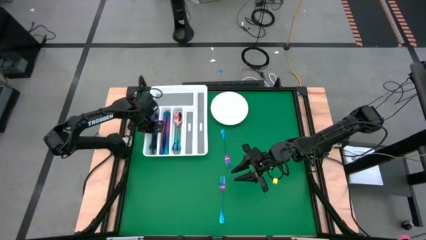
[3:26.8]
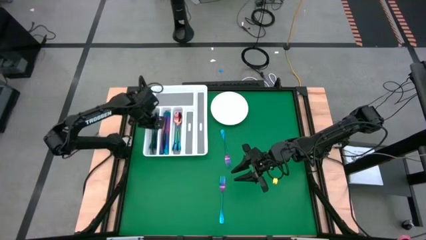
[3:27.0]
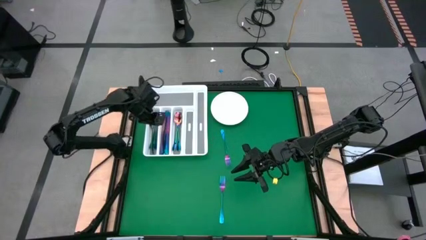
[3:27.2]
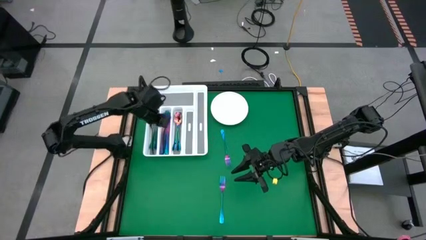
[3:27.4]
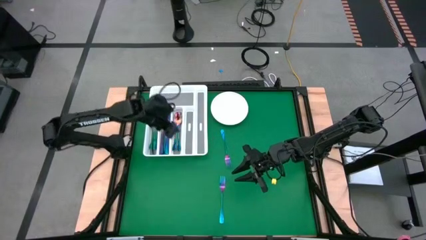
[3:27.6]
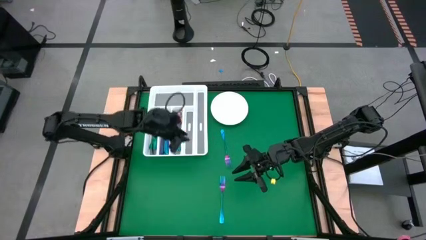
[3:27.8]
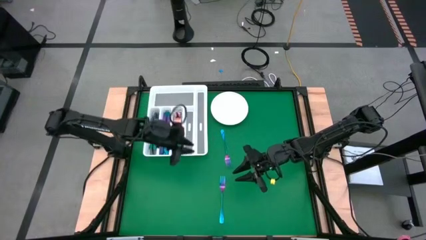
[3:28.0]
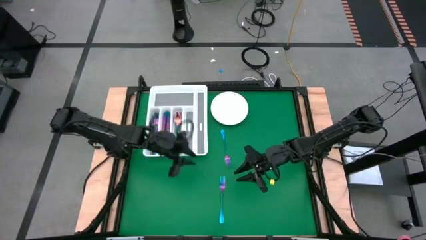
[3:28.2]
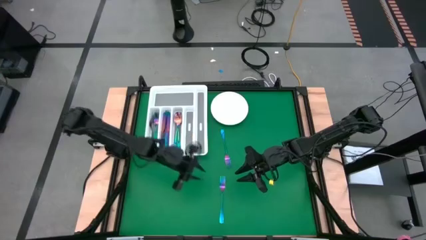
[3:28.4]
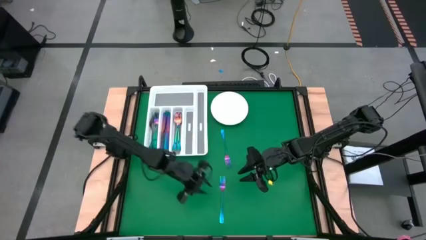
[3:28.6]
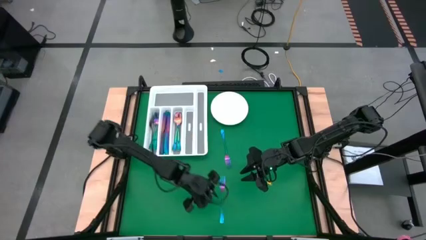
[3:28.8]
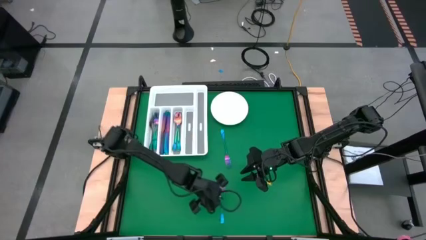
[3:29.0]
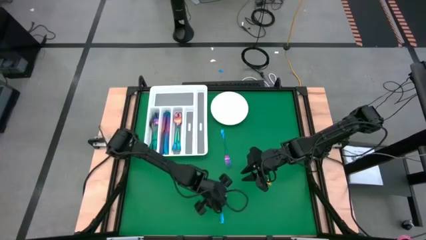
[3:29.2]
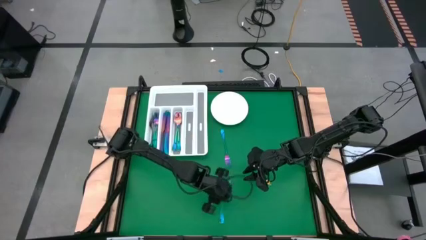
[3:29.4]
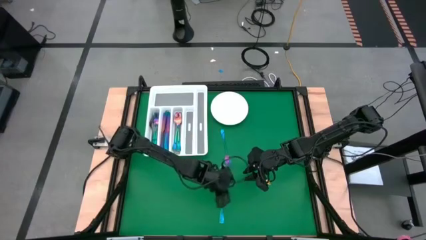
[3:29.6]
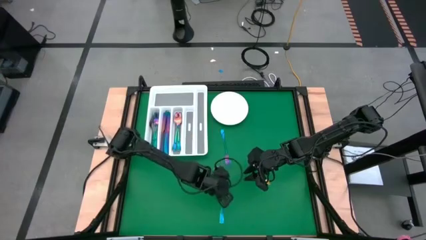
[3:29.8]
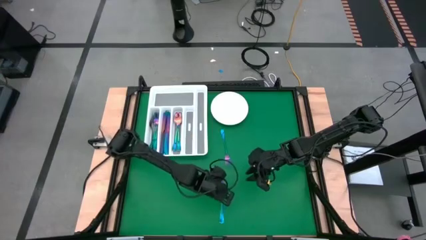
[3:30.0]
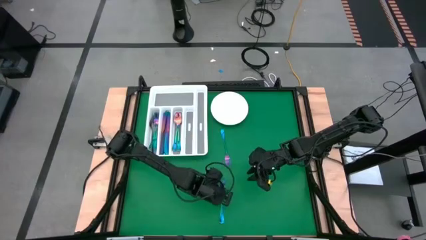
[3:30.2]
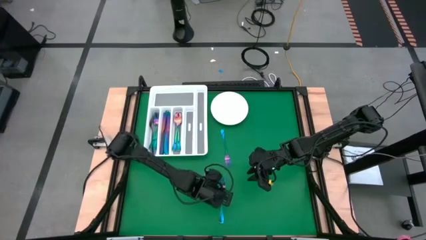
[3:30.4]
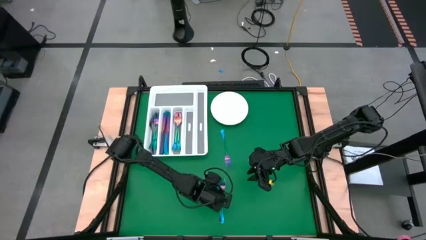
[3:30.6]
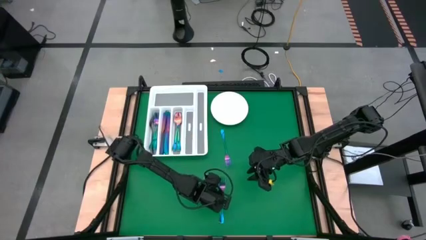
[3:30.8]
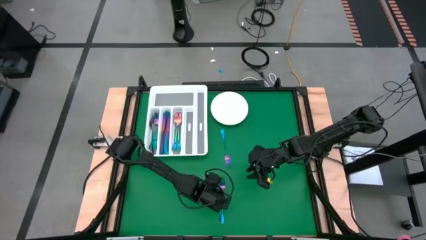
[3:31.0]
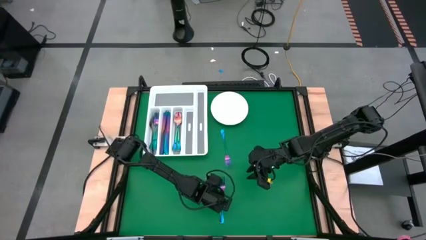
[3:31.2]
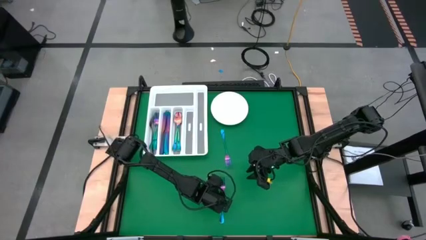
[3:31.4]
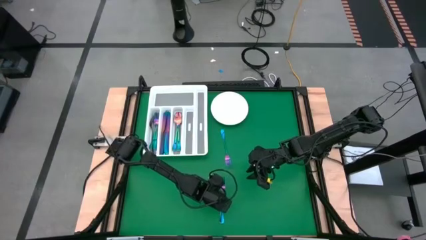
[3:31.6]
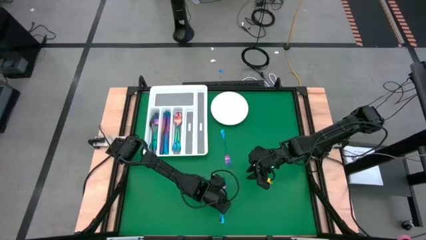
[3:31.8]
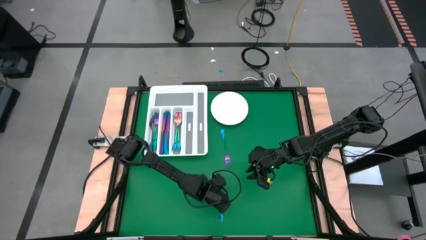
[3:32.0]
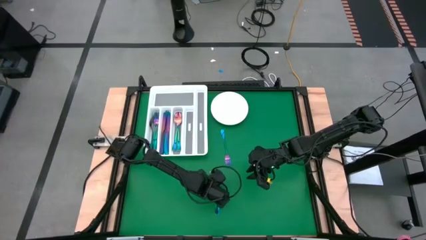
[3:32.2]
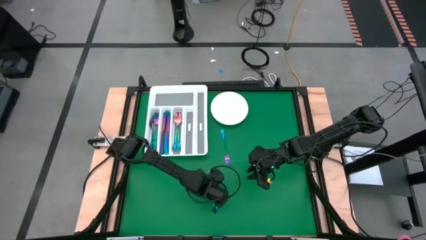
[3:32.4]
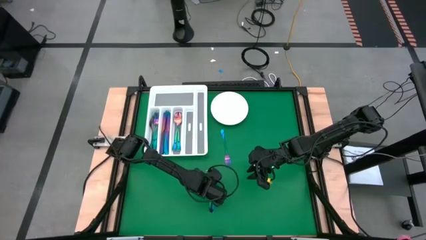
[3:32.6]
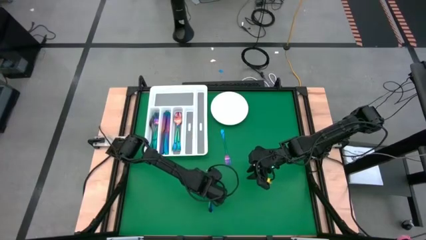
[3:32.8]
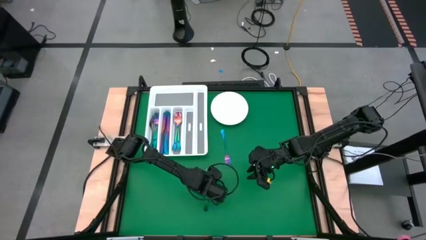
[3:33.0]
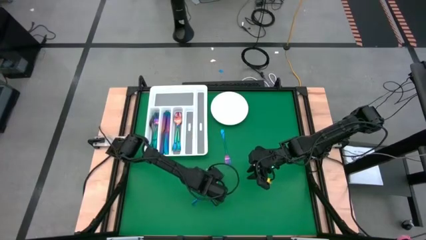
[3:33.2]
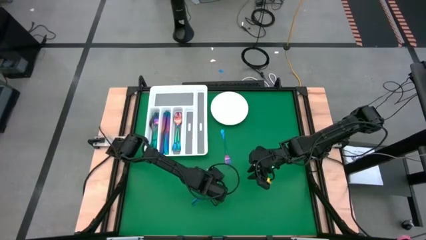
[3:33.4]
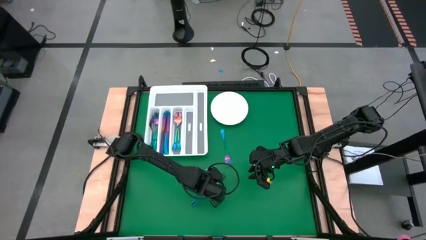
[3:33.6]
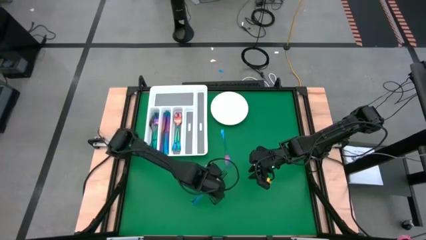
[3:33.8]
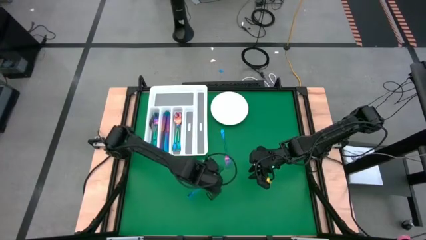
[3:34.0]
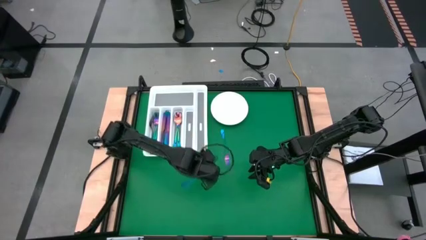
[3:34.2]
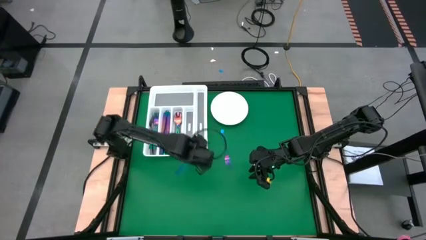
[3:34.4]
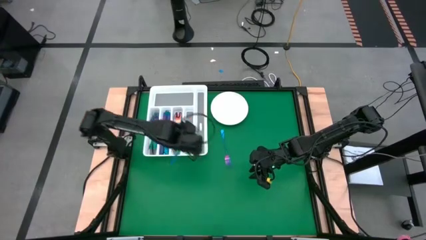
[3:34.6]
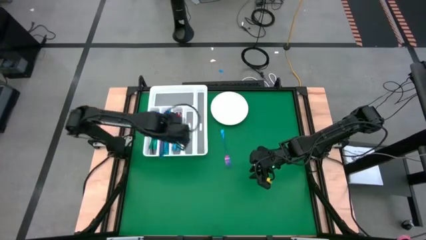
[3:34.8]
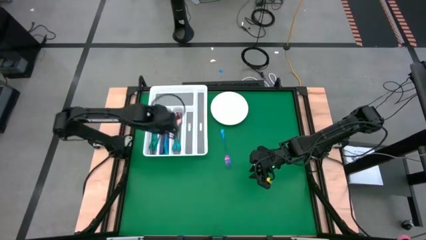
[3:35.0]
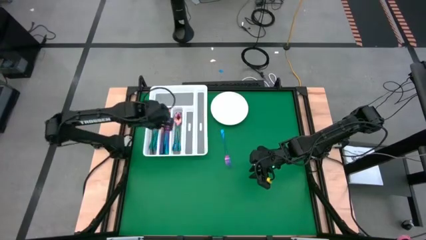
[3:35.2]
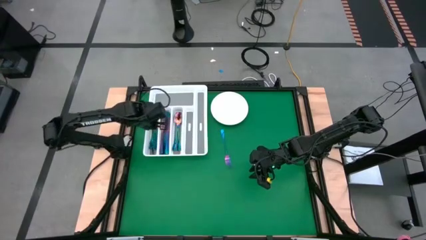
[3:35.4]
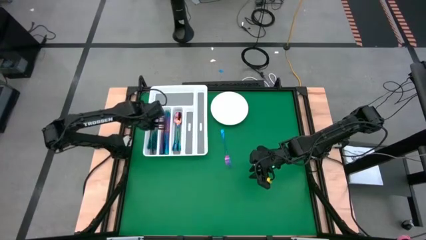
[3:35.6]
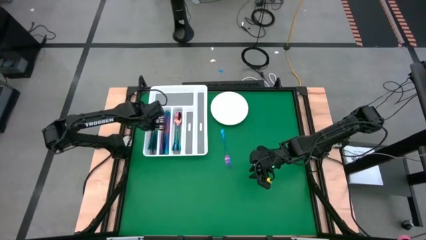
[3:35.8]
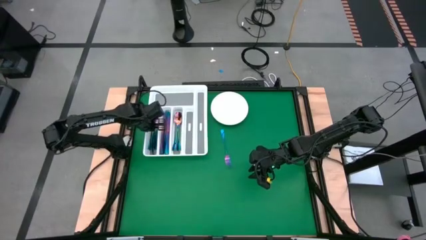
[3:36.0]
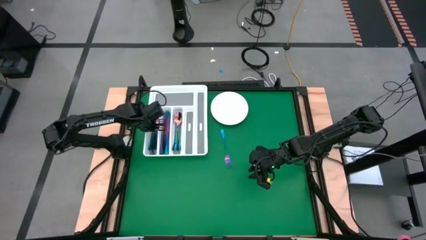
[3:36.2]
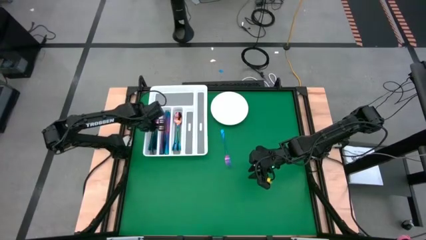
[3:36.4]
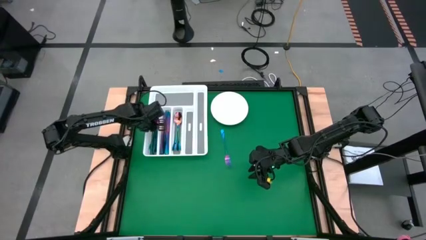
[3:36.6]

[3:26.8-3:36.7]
Task: Sort silverware
Put the blue fork into the silverware tray

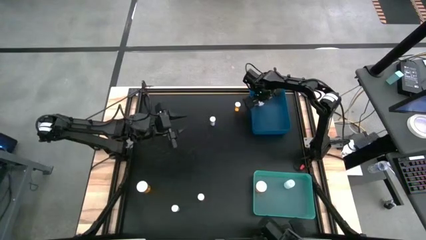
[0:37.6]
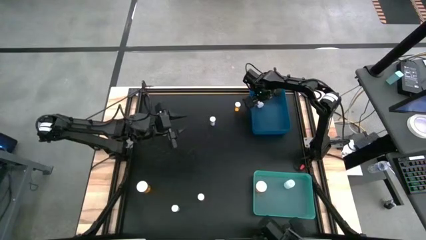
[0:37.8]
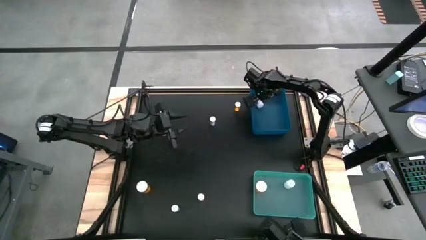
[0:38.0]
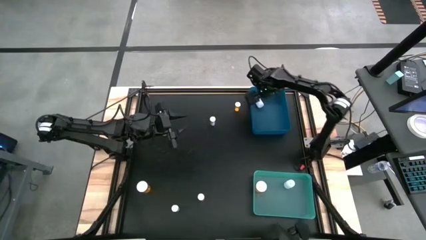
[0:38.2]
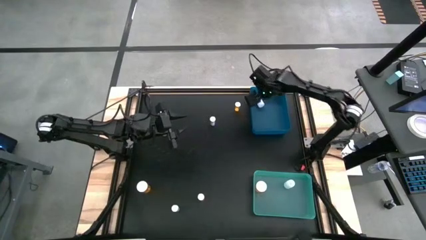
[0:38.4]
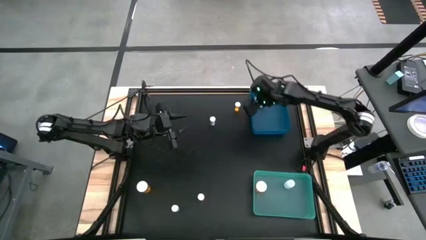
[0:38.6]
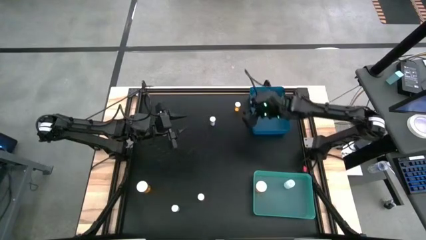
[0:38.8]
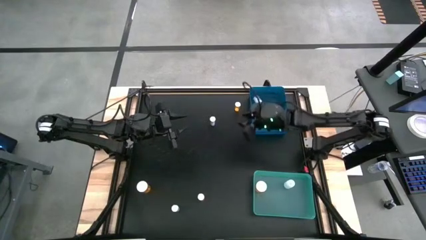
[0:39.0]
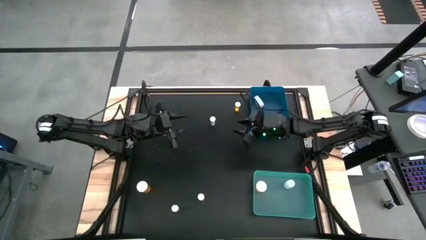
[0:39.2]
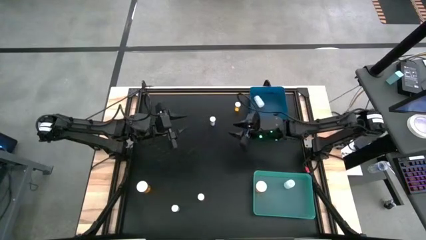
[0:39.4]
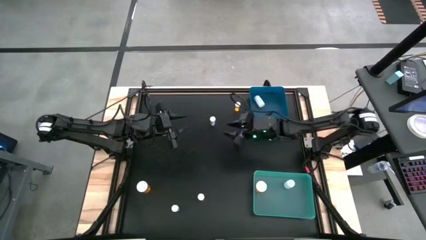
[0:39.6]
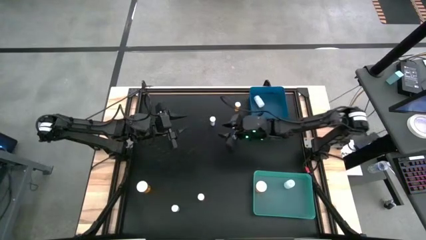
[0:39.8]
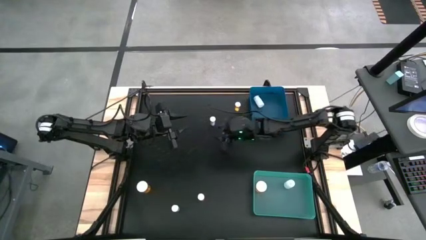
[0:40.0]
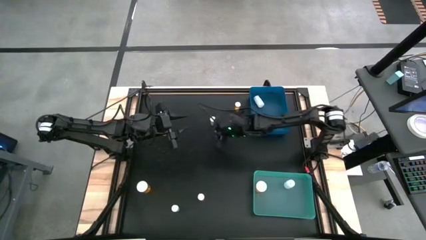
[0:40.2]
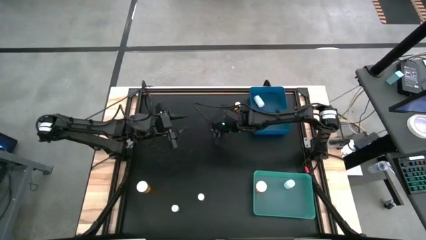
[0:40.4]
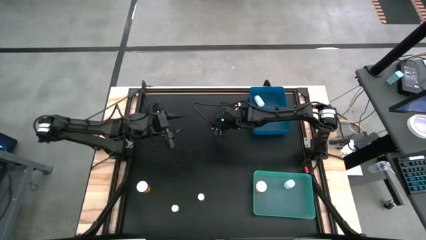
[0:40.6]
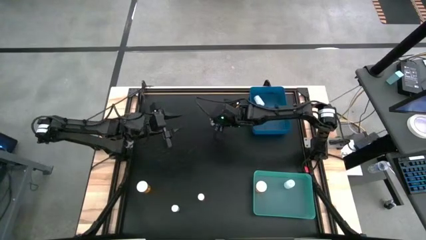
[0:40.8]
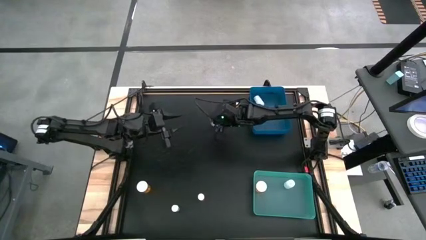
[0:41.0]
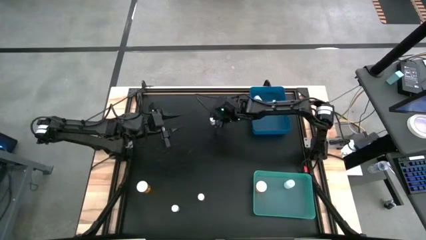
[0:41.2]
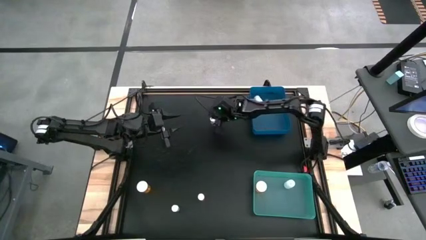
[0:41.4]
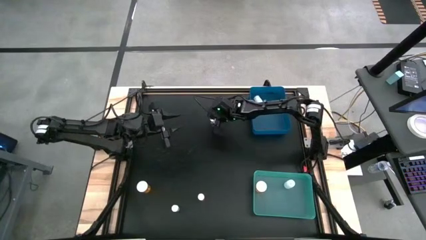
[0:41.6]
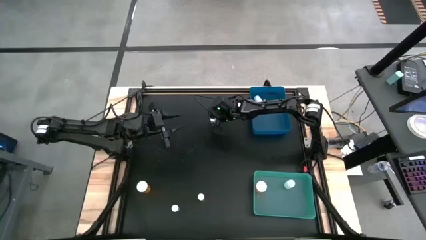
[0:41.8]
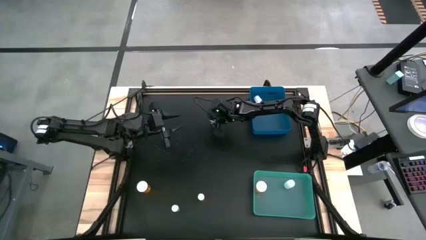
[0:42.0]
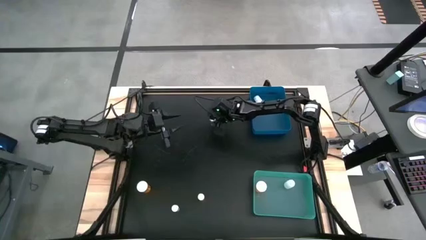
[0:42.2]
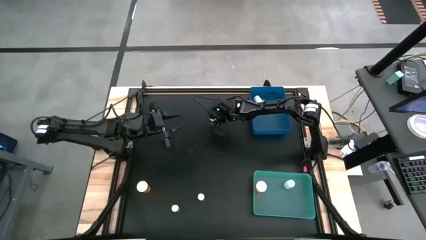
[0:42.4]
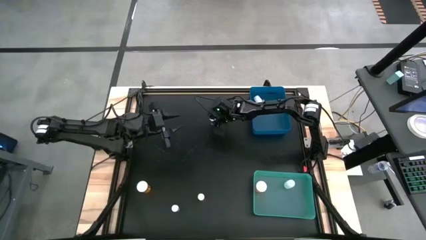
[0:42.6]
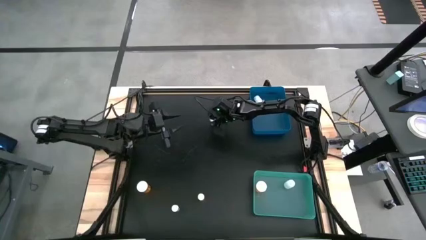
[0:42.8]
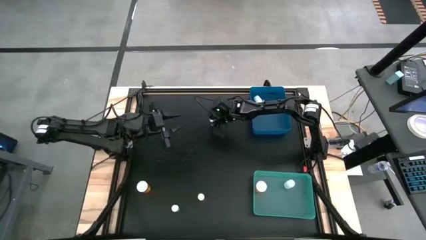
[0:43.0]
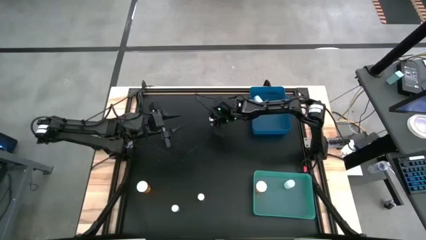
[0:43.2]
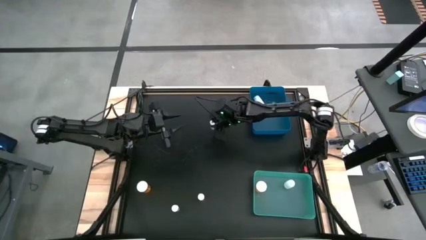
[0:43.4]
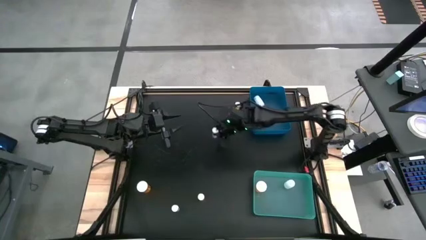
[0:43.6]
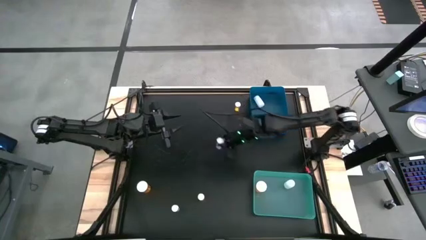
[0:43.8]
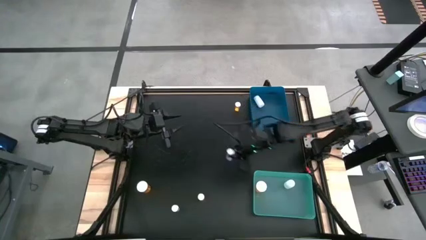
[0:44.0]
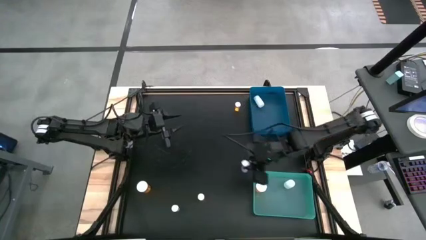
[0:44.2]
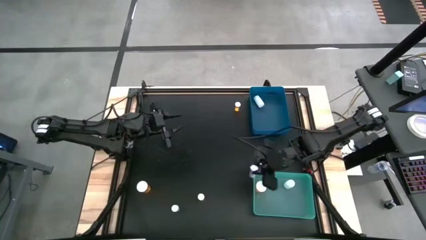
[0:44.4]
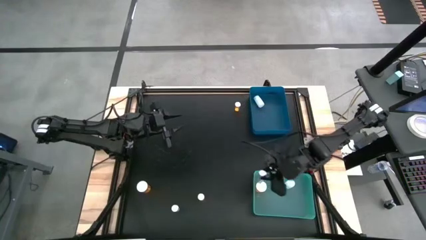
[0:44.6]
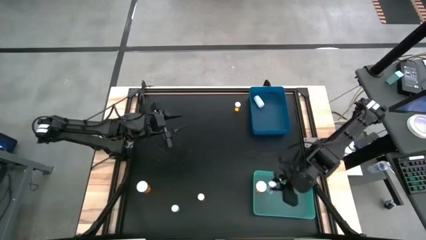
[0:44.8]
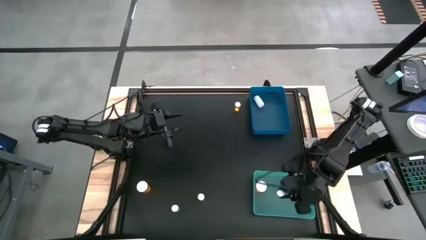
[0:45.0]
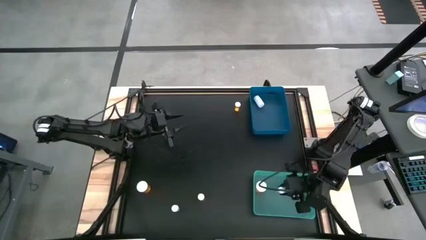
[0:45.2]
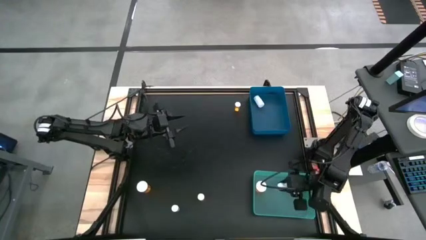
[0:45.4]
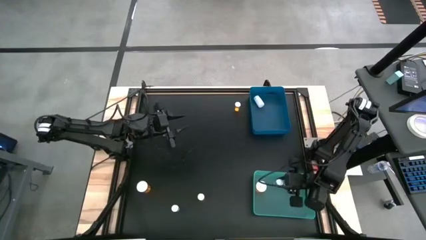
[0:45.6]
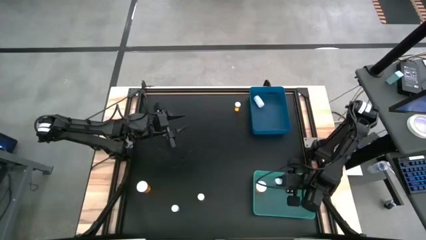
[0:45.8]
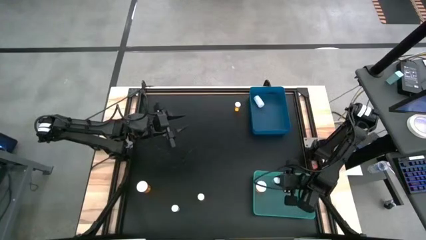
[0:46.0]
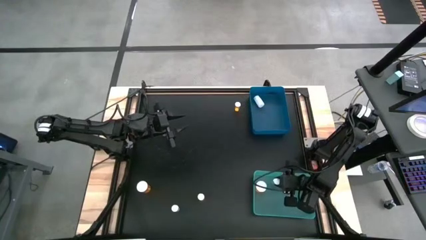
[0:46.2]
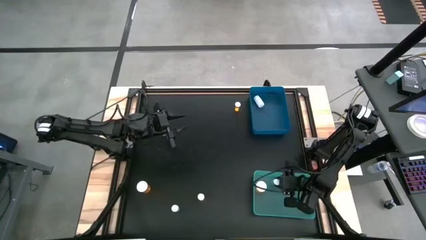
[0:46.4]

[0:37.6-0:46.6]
Task: Pick and place medicine bottles into bin by pill shape (circle, oval)
Put the blue pill bottle into the light green bin
